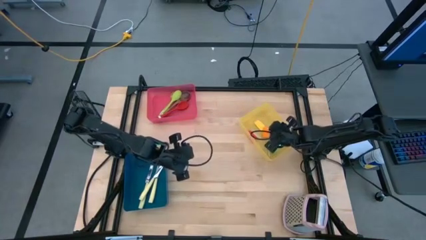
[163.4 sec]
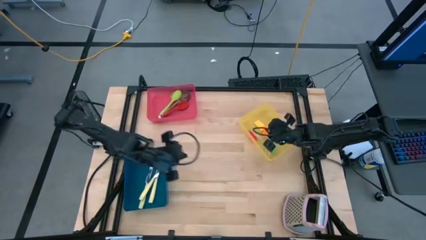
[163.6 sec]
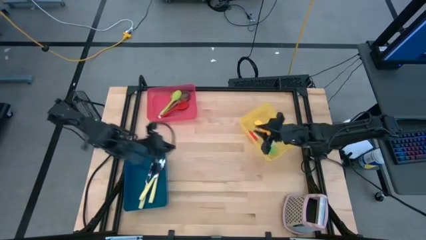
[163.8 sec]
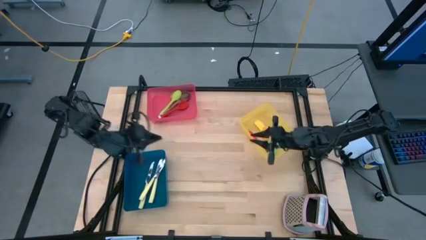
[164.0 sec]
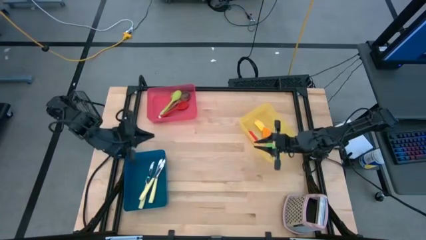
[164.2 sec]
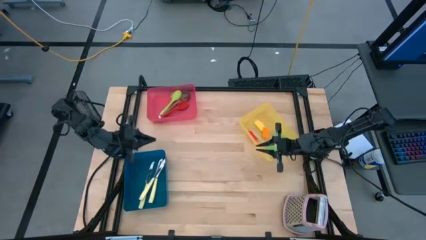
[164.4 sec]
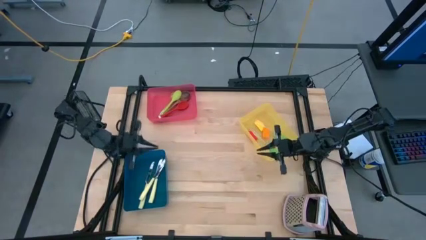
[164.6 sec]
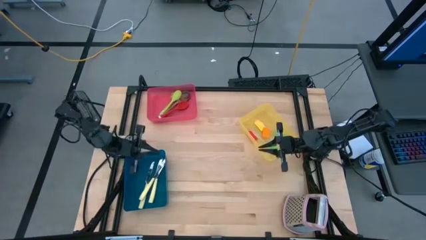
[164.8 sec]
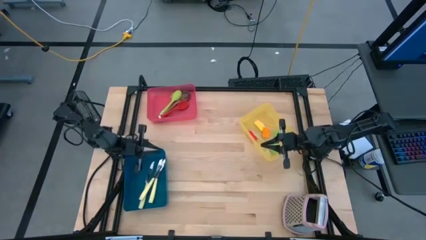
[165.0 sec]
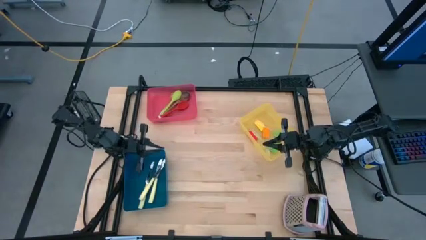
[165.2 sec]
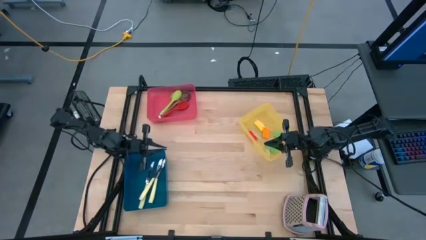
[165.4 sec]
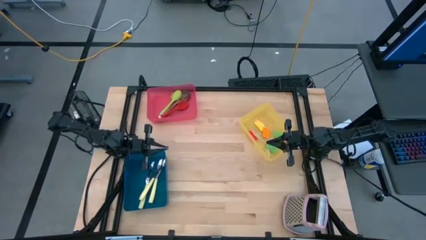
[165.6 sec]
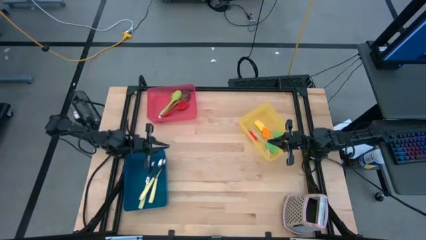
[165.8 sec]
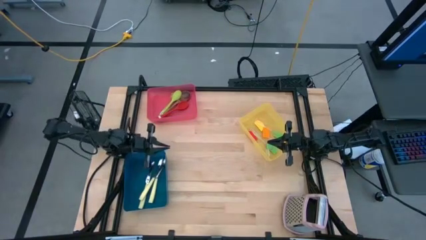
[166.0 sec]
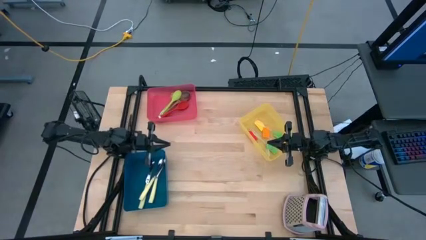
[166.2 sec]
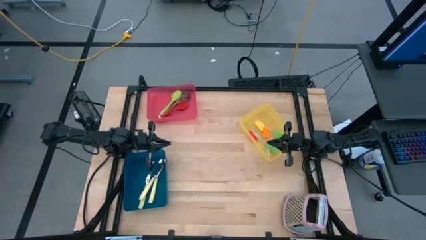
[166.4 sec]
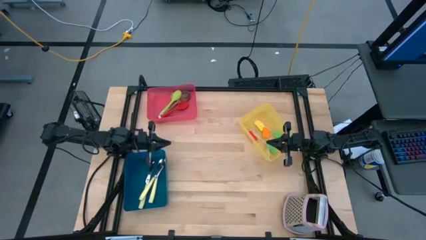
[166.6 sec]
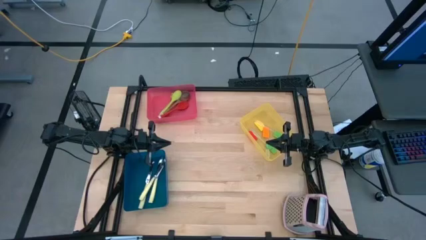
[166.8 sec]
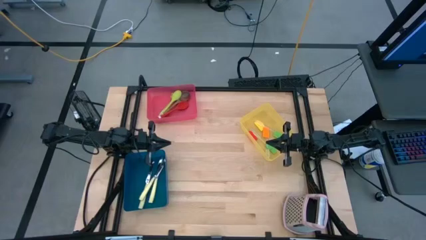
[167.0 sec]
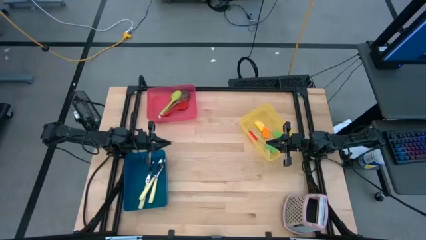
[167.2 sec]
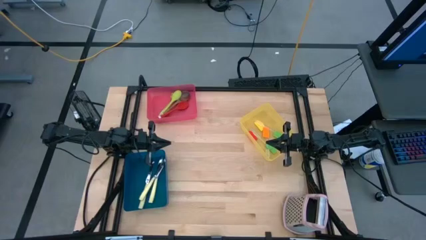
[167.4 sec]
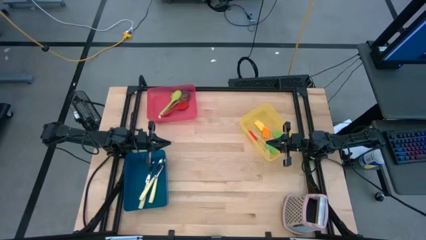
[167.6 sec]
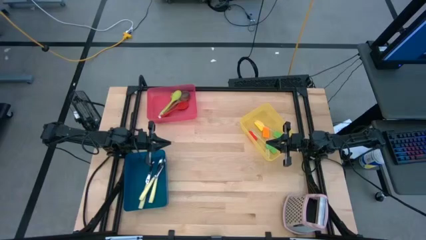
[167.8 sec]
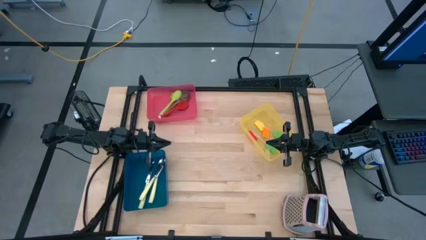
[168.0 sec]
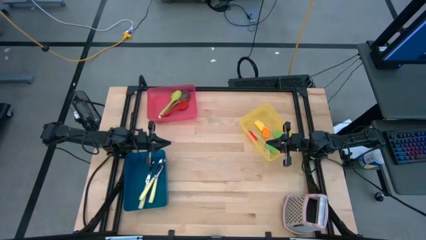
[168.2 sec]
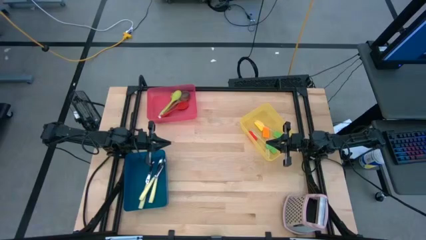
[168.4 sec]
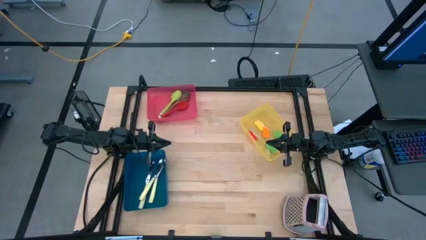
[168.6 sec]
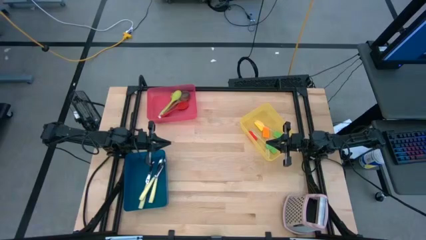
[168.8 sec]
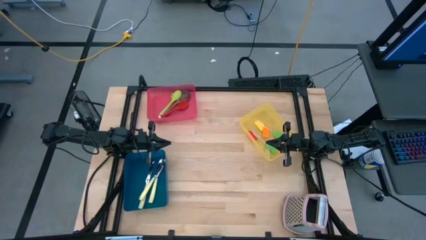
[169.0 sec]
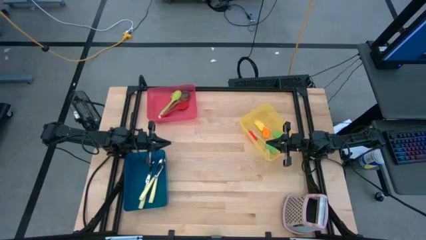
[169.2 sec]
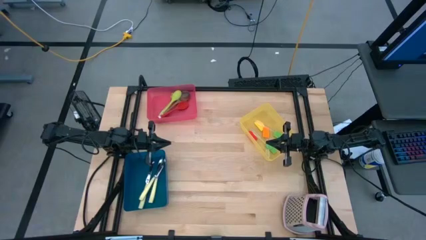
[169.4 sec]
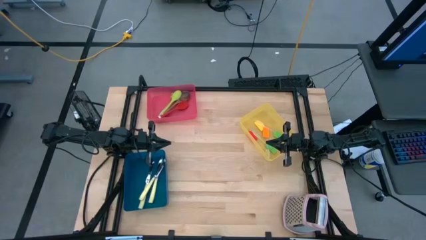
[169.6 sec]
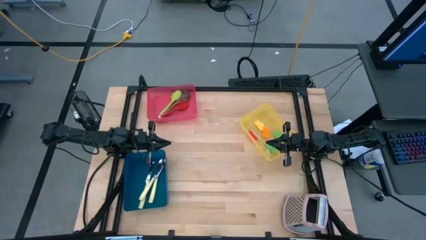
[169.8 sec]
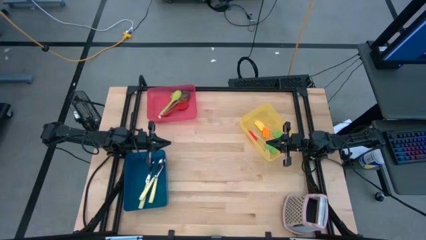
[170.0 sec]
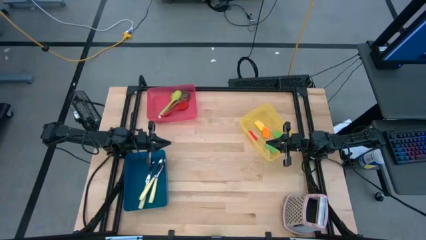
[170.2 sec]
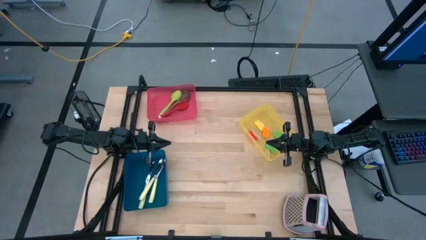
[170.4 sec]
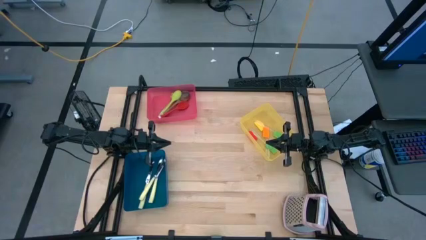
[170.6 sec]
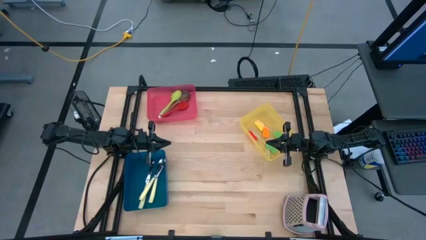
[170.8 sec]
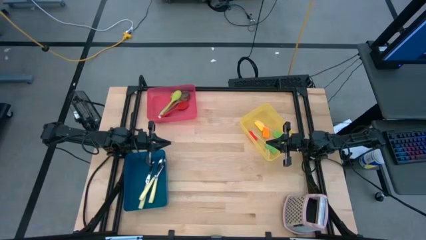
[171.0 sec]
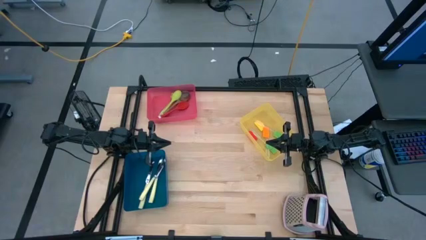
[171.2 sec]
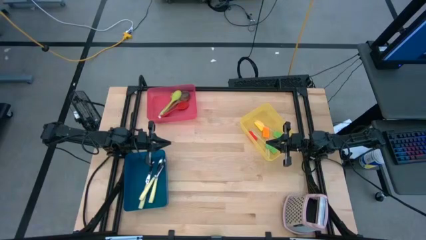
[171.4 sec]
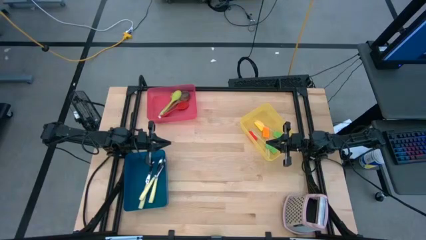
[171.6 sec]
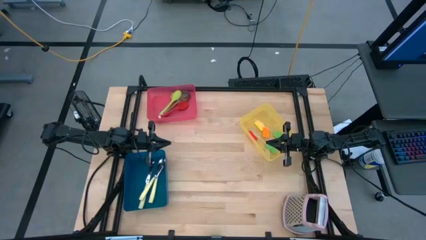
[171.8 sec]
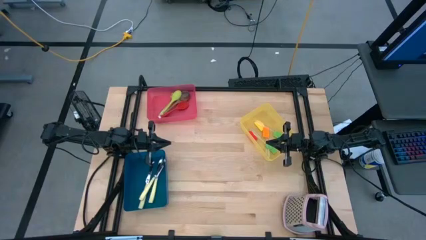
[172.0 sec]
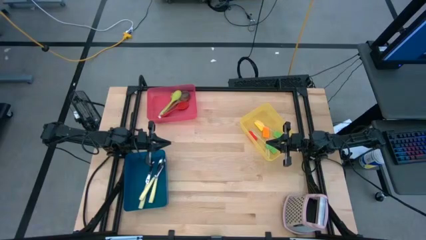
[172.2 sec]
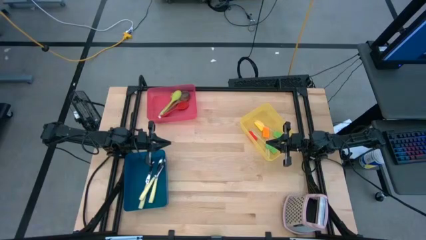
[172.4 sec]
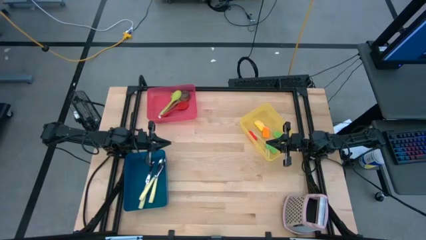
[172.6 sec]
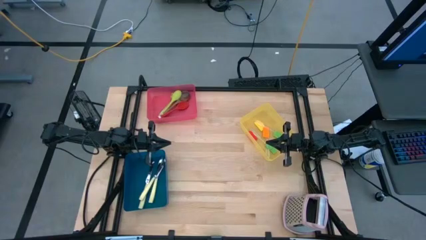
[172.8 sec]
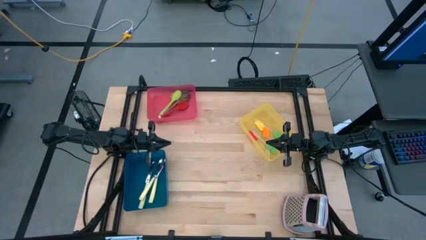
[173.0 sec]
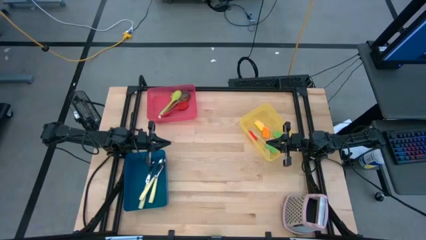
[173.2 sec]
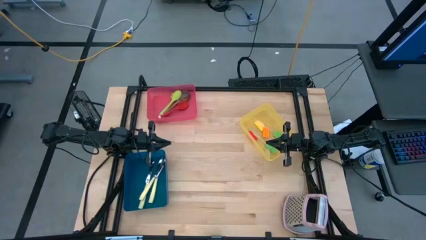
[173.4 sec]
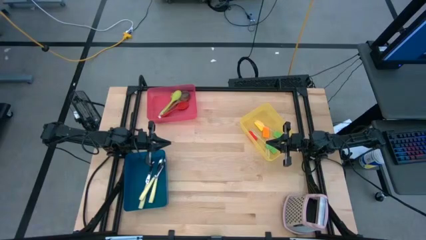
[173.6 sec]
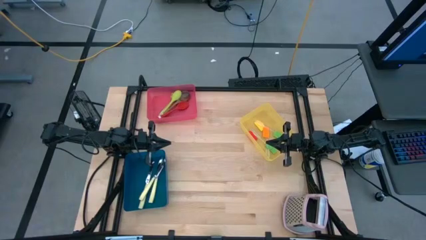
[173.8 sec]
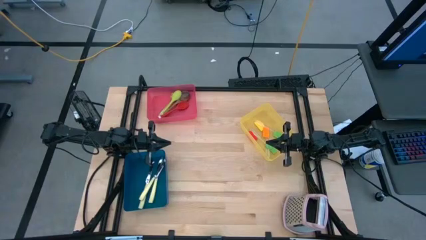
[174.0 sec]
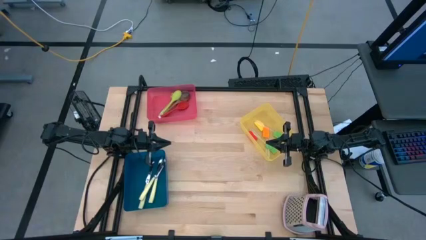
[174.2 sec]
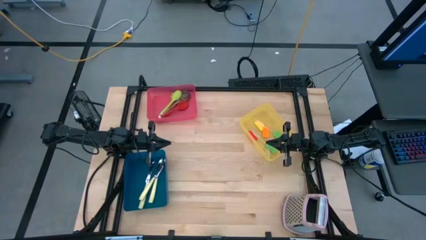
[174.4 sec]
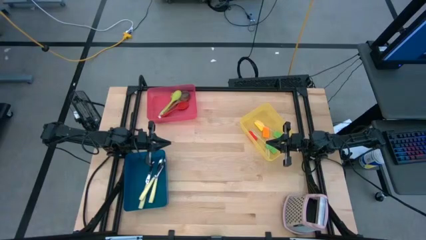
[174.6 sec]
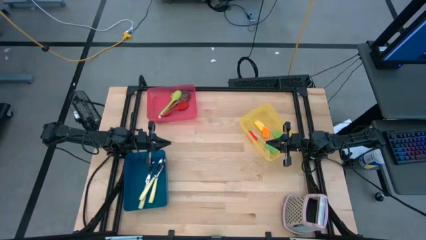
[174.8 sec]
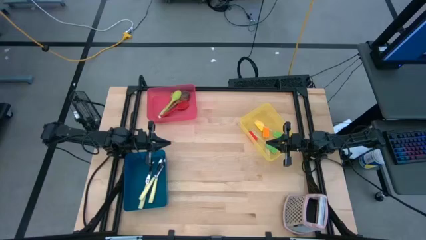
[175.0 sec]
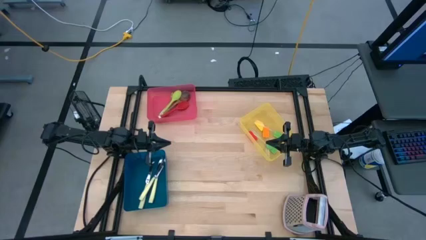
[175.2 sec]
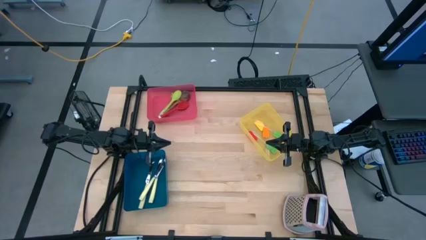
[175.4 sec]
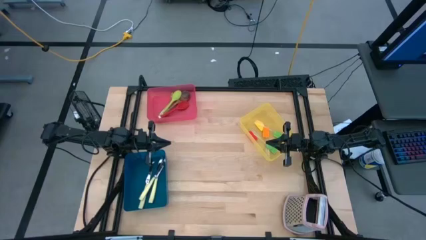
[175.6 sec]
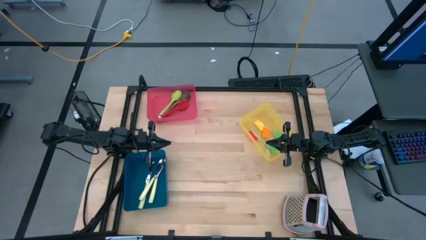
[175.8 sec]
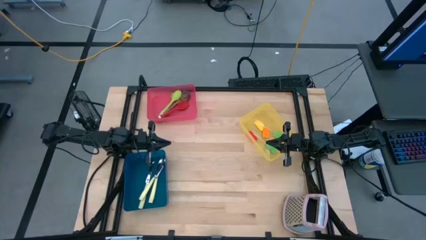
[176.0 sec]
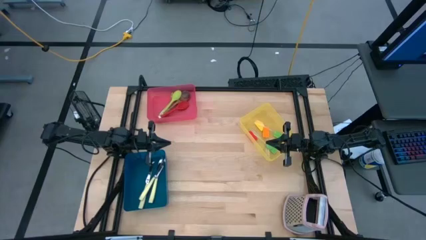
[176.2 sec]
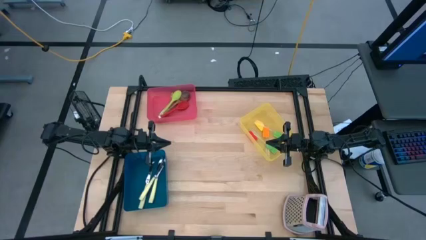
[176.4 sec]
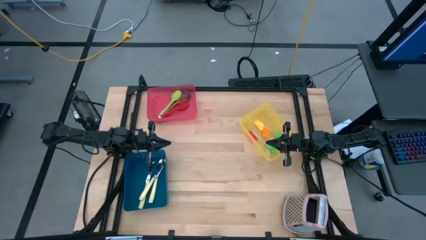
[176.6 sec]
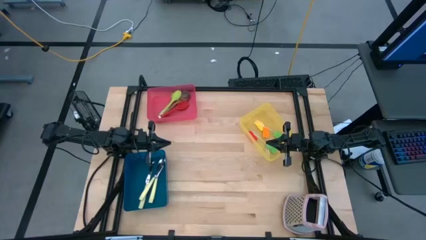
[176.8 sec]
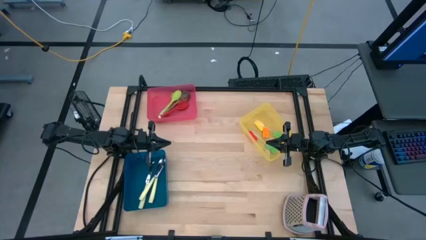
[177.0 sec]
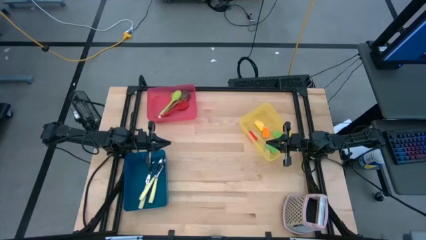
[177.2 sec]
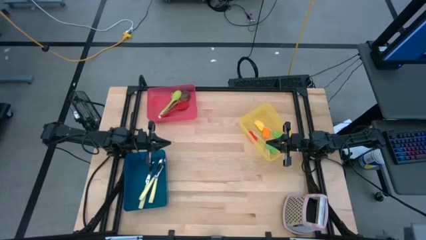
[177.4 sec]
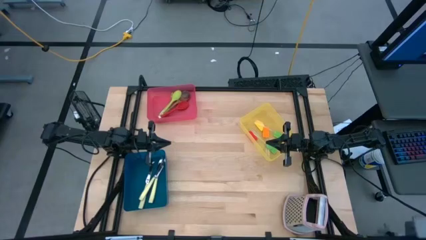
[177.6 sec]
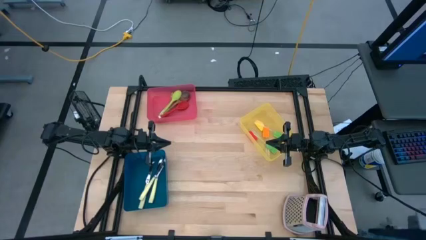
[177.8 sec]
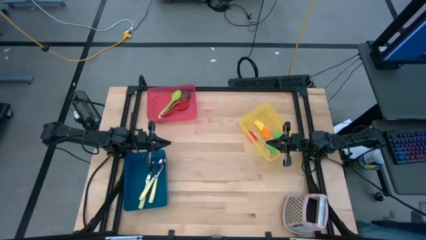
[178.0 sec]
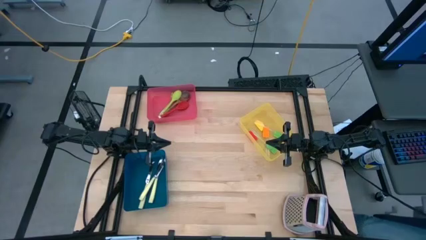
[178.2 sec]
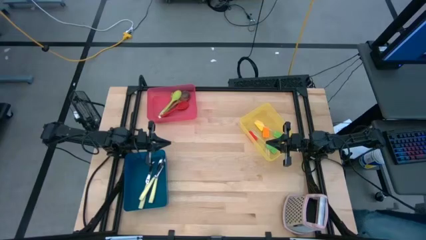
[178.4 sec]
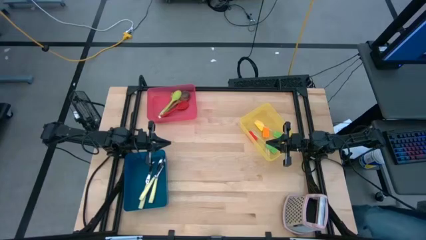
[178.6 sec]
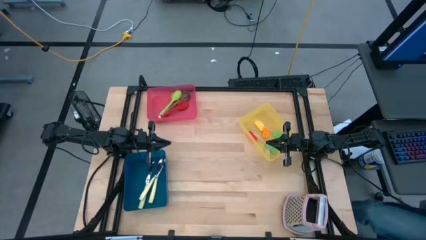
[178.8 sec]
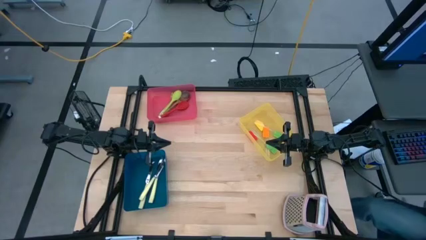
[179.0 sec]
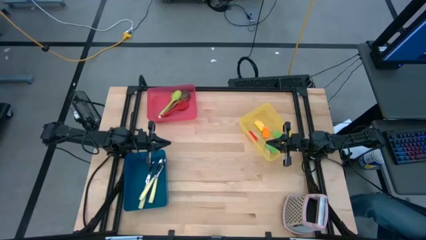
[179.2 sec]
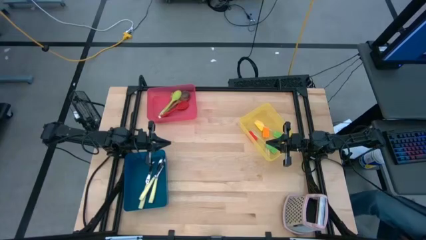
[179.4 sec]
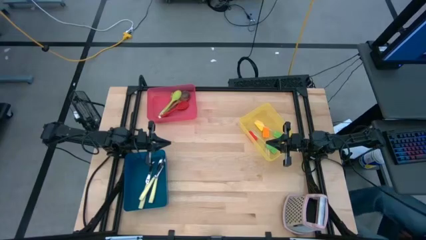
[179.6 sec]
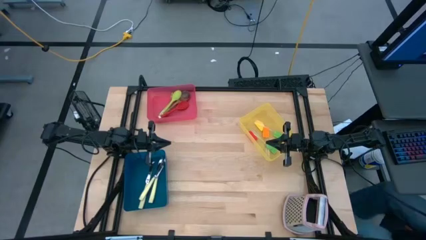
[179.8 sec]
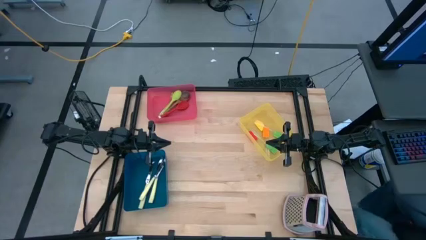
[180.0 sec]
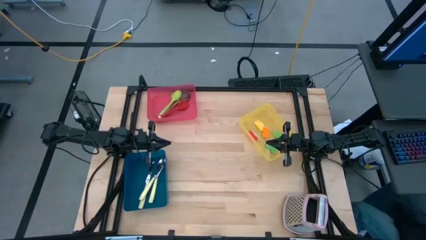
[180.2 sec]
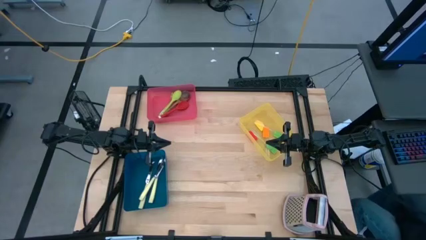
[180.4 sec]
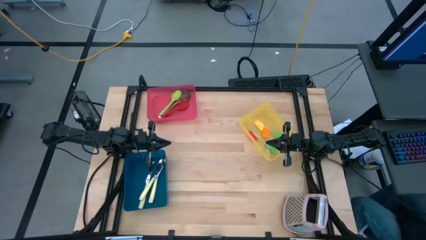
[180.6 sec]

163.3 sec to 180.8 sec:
Task: Pick & Place Kitchen Items
Return to Home Position
